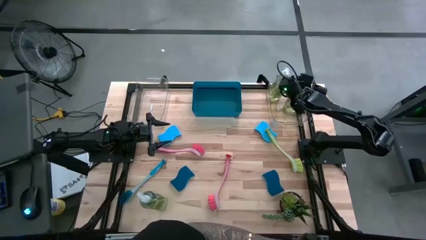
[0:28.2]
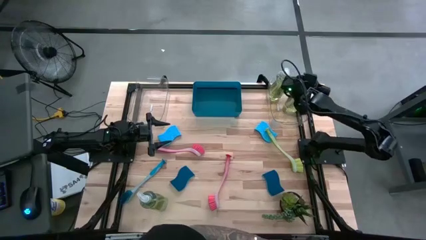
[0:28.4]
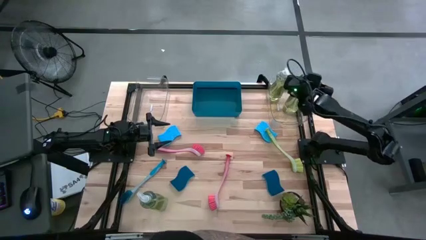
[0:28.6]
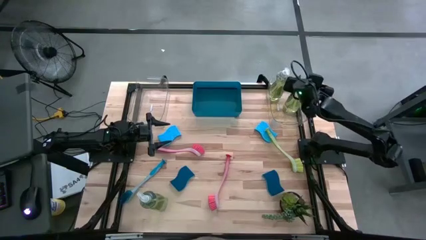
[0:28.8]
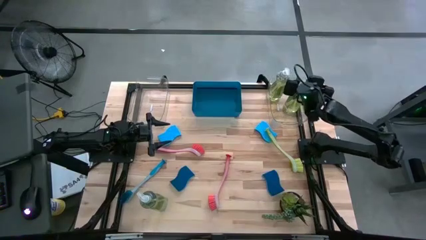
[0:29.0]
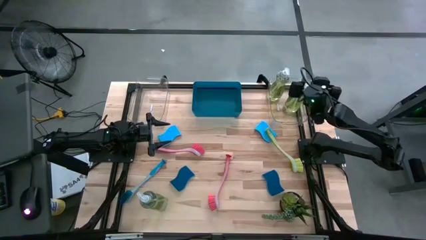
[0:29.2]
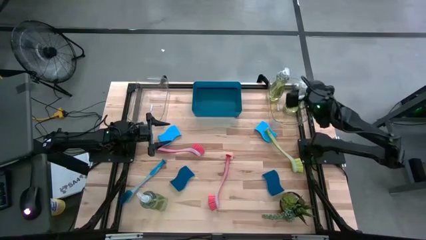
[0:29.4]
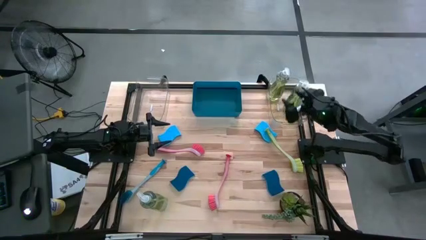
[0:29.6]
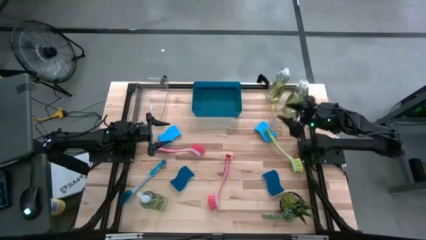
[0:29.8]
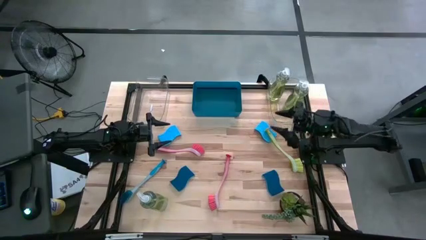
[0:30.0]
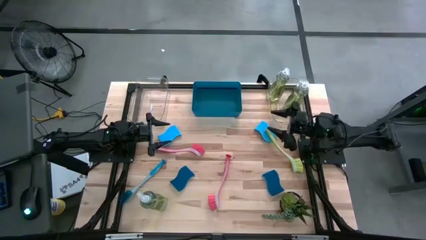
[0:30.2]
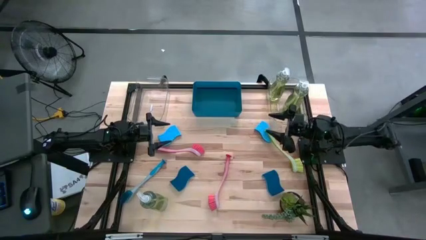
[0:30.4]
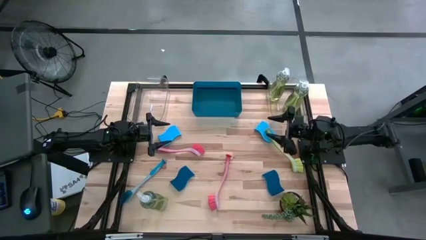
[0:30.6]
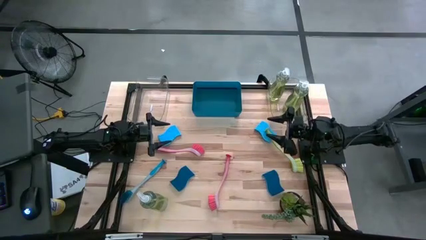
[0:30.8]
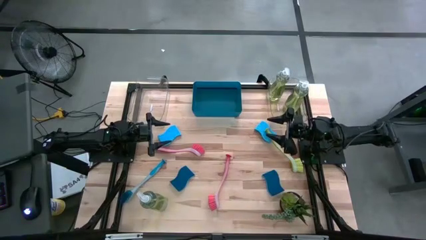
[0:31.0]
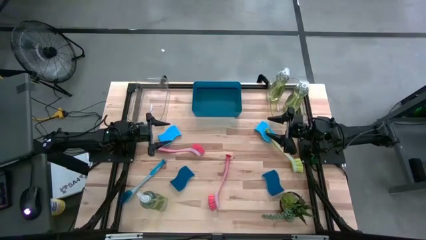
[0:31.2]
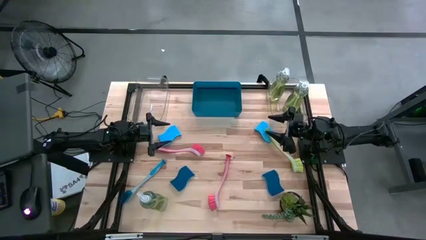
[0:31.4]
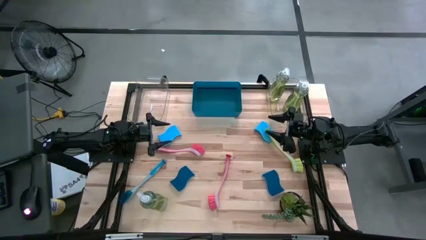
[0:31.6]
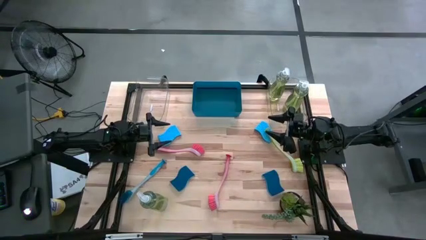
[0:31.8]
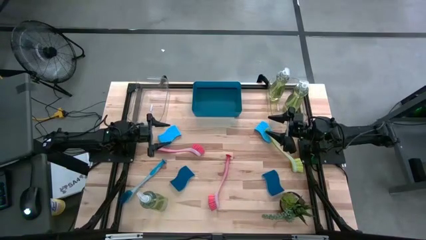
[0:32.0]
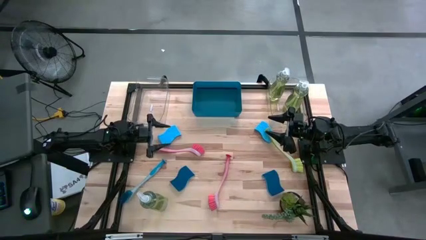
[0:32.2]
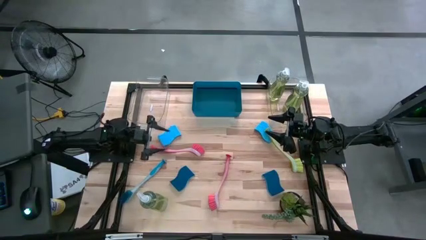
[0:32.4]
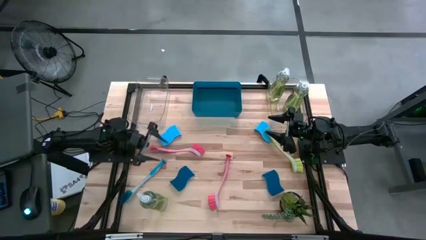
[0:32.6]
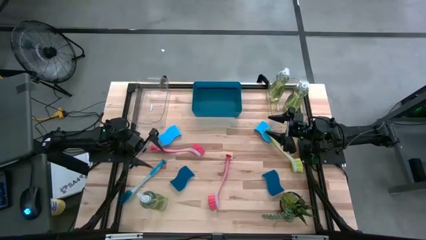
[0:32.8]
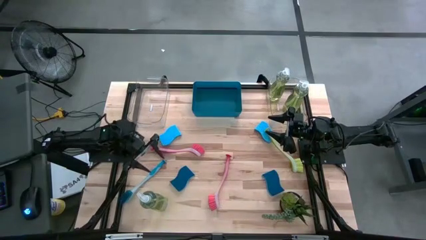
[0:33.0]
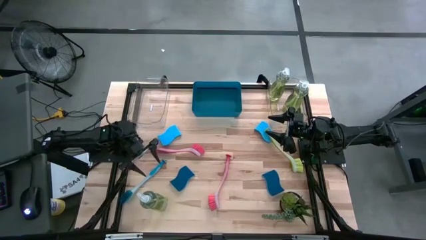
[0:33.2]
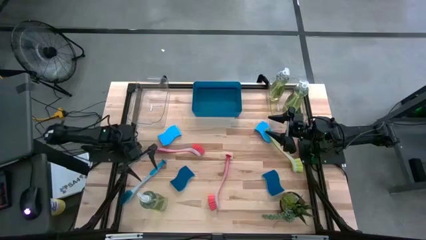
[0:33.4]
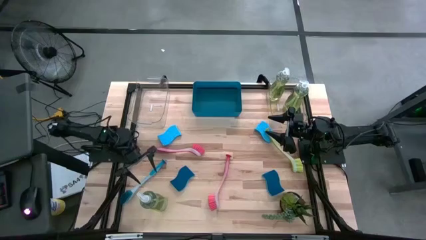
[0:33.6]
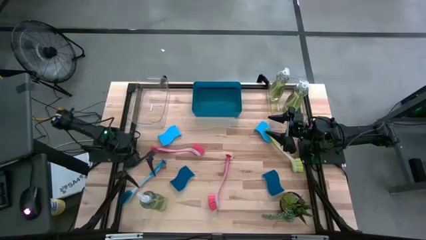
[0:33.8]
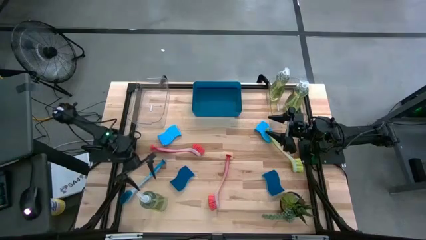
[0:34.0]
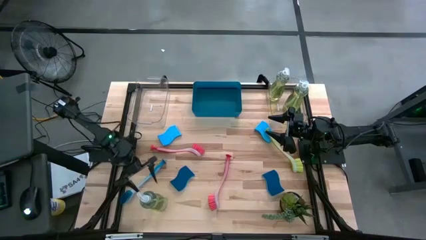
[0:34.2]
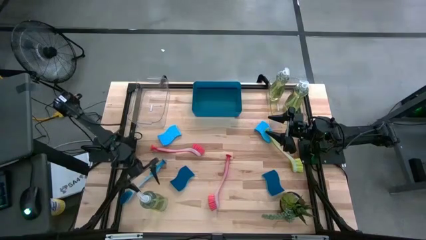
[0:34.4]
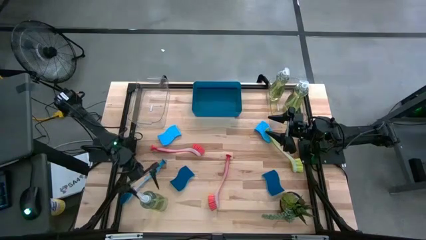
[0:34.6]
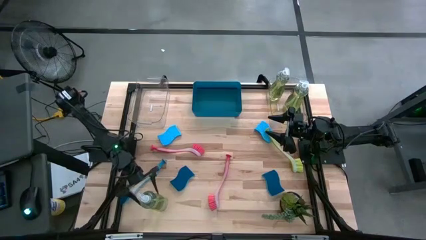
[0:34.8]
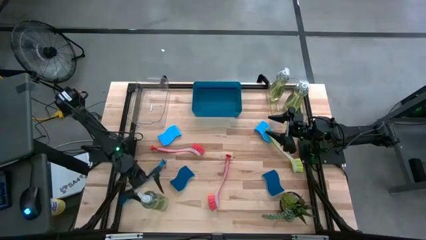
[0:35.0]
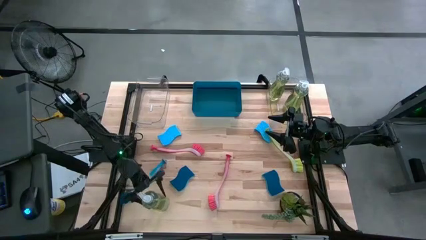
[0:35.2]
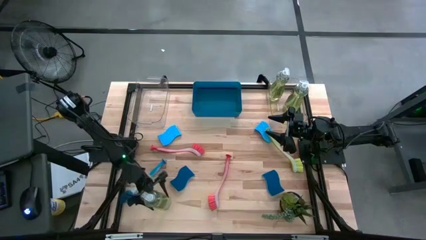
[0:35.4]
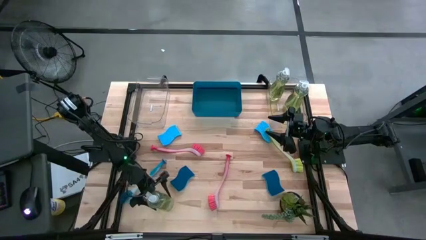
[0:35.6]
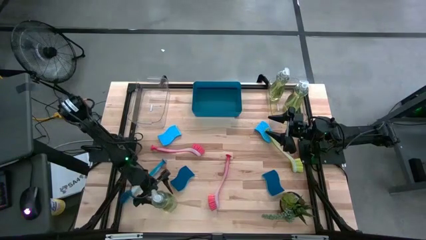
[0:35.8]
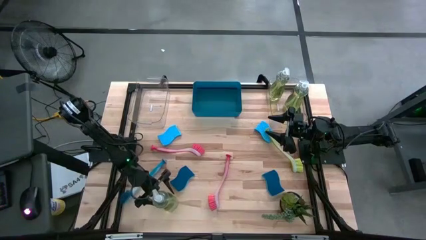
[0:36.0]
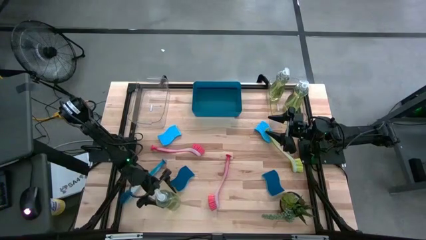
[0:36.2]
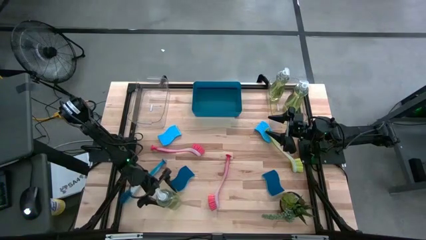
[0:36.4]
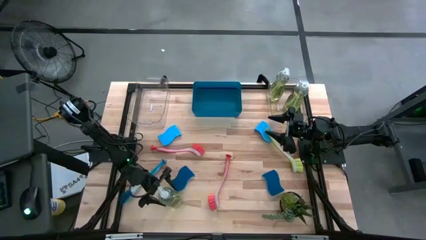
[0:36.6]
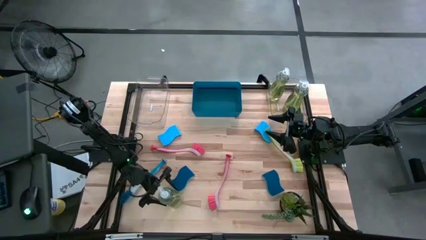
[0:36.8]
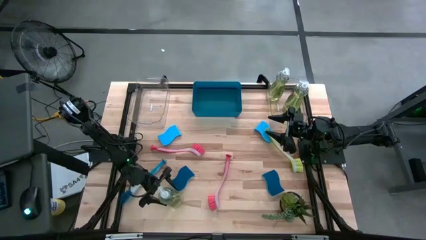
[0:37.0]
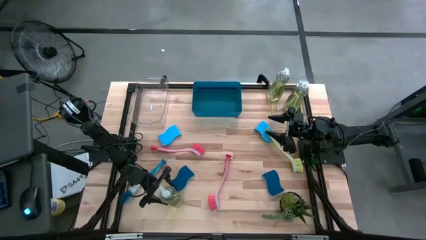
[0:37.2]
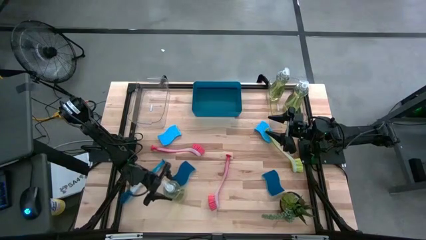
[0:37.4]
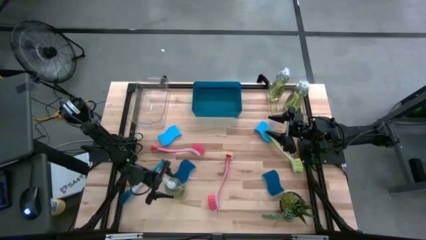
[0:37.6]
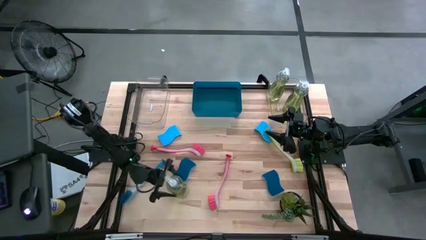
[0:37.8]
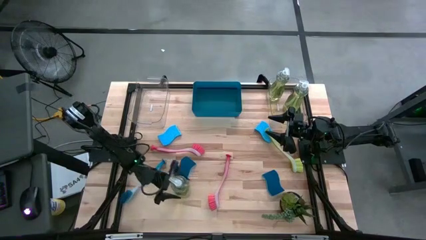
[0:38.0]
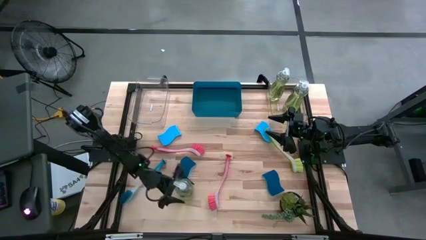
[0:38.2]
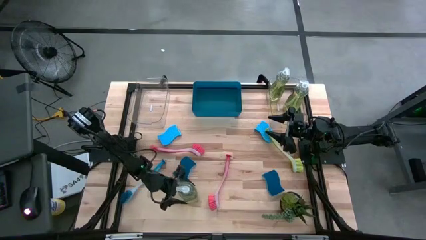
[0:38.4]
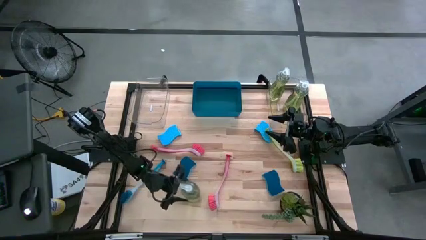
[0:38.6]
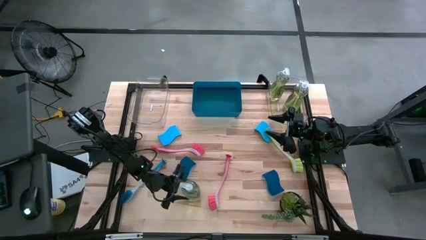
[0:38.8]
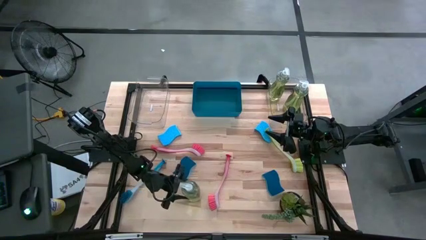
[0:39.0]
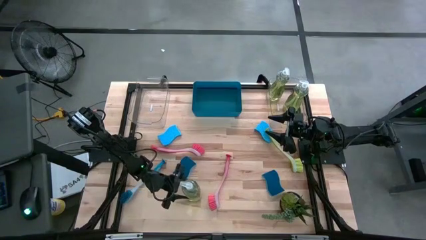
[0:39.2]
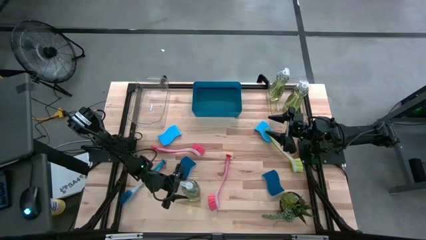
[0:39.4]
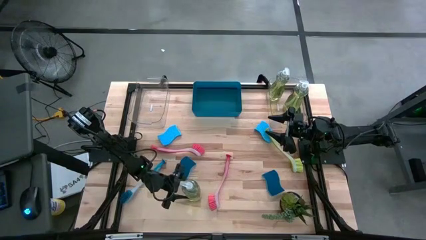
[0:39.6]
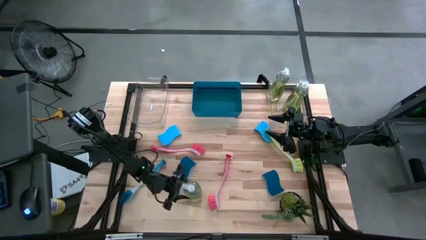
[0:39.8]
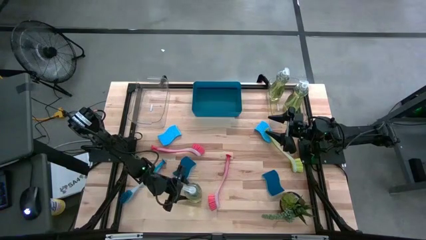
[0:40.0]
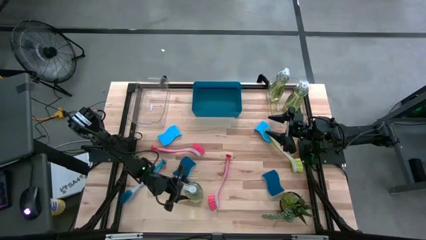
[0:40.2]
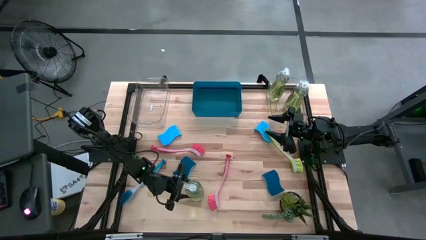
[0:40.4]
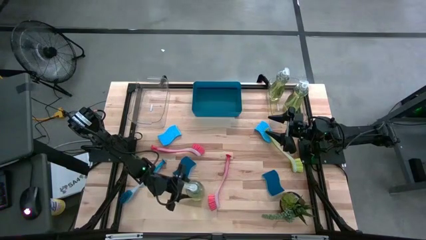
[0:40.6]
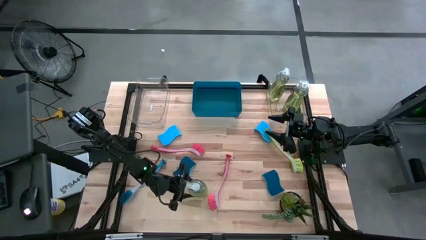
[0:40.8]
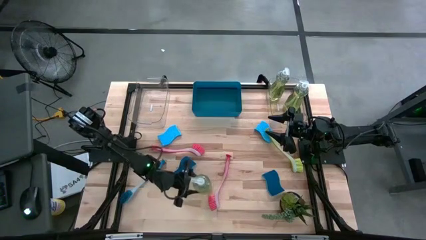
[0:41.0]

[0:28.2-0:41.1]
Task: Pick & Place Kitchen Sink Supplies
Put the green dish soap into the right transparent bin

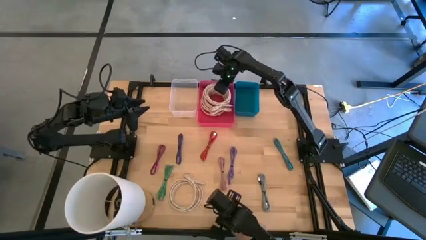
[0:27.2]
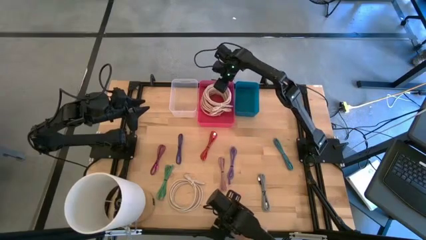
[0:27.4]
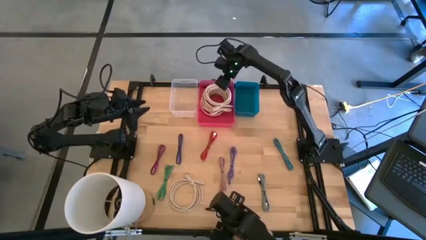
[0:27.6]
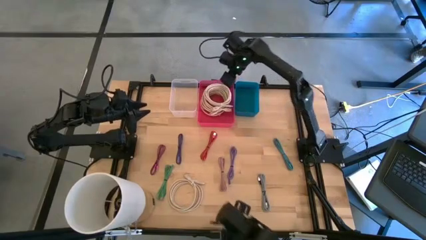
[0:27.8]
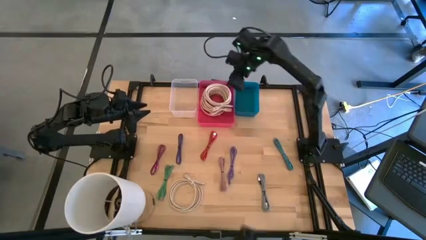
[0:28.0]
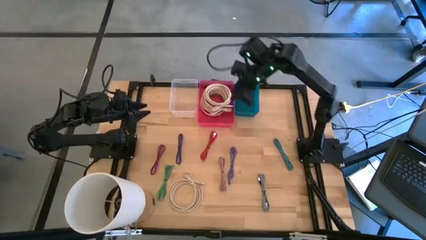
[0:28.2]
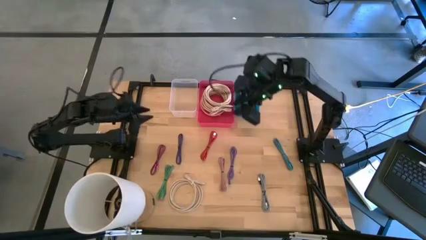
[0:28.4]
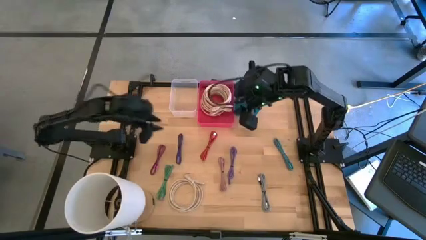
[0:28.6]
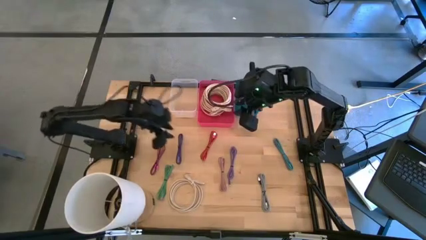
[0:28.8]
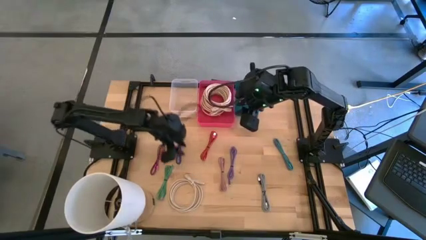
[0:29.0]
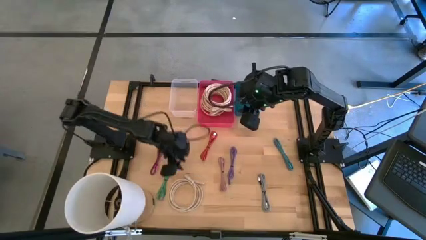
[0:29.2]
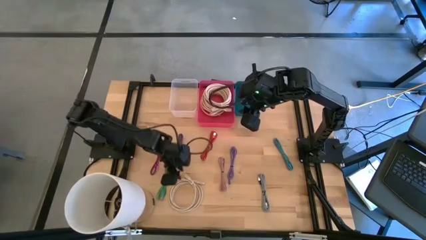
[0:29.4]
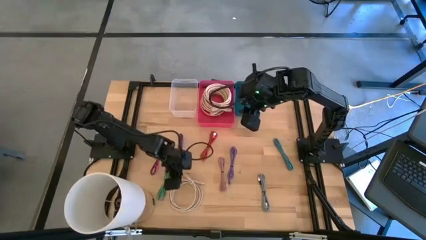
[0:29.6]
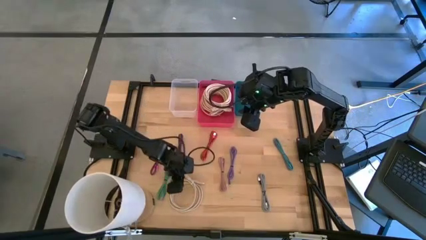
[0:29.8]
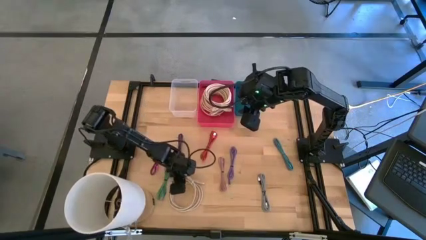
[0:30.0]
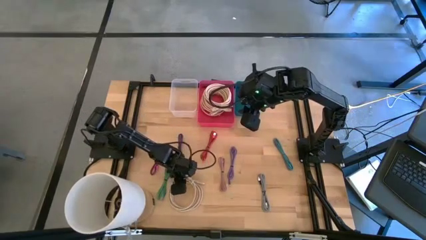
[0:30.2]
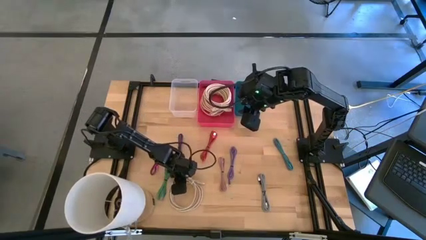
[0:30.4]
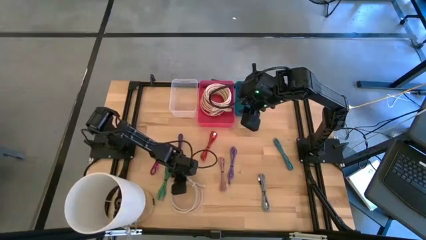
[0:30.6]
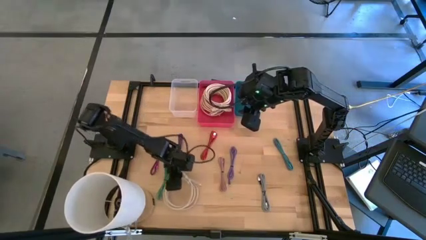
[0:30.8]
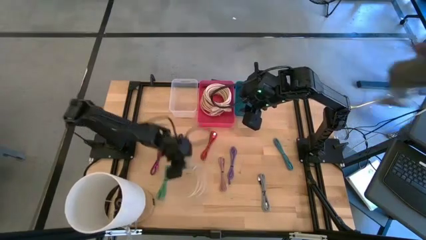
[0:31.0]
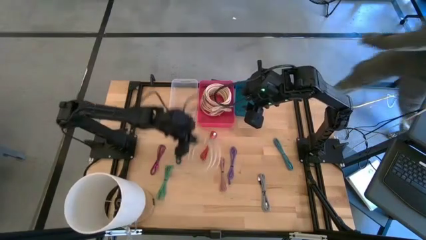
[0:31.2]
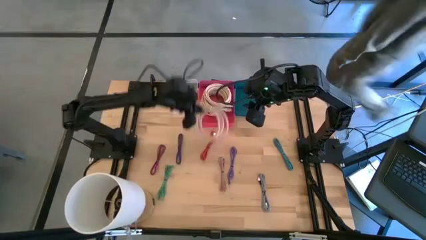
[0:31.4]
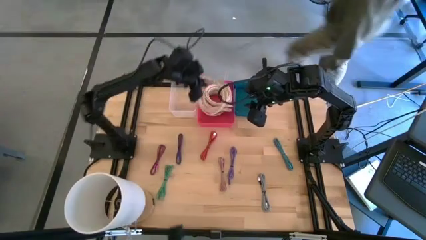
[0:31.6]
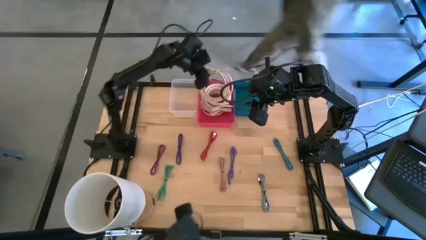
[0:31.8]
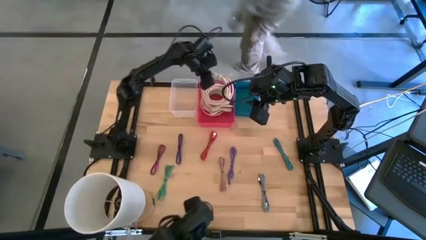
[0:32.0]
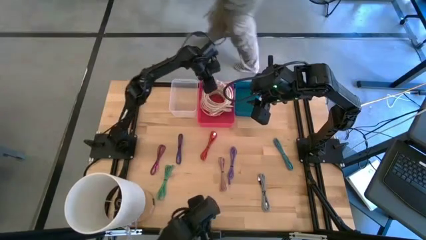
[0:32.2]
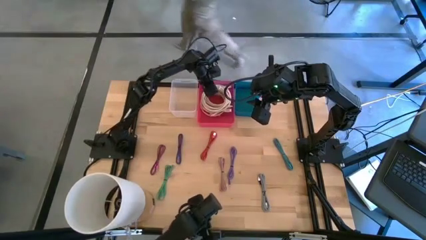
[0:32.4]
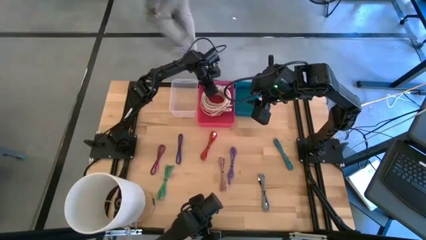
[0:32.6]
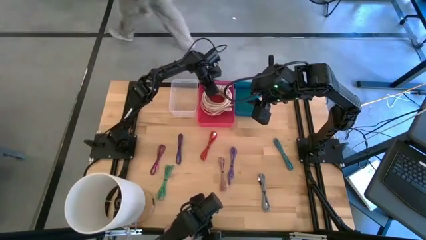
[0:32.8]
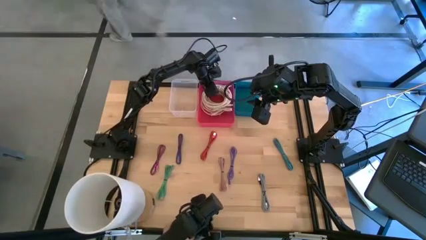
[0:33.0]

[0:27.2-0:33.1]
Task: Pick & Place USB Port
Put the white HDMI cable into the pink bin
